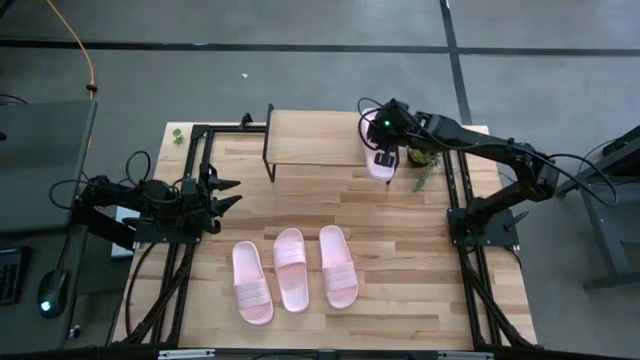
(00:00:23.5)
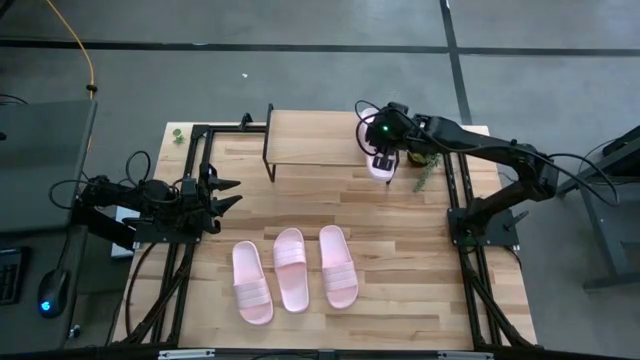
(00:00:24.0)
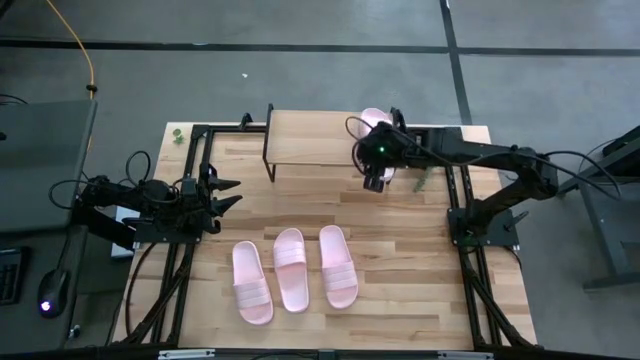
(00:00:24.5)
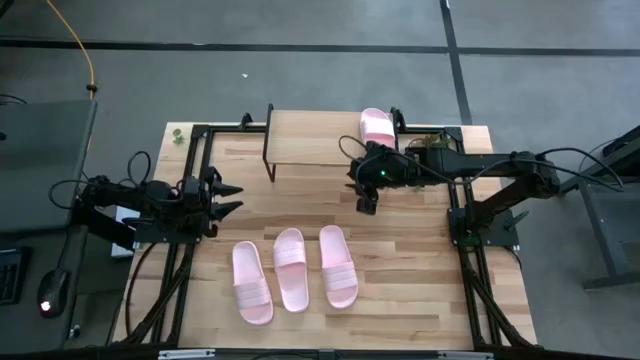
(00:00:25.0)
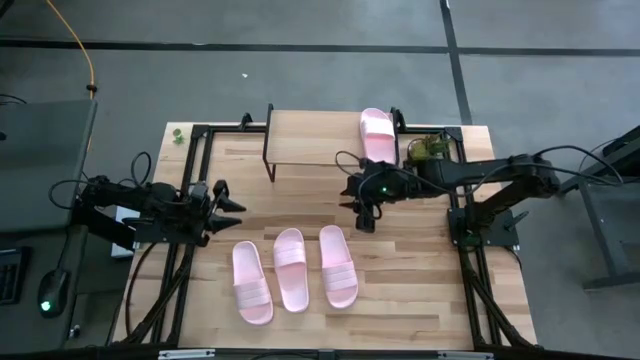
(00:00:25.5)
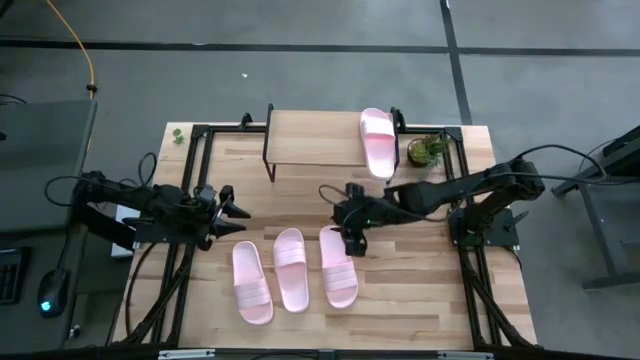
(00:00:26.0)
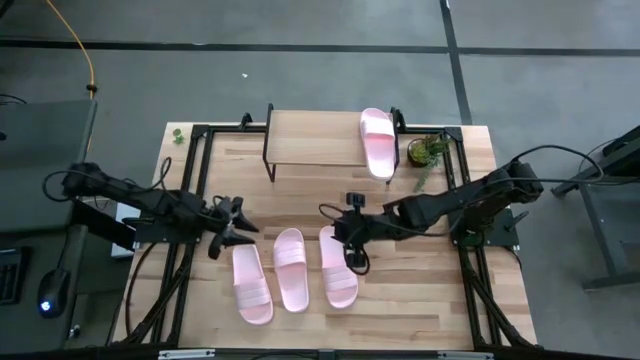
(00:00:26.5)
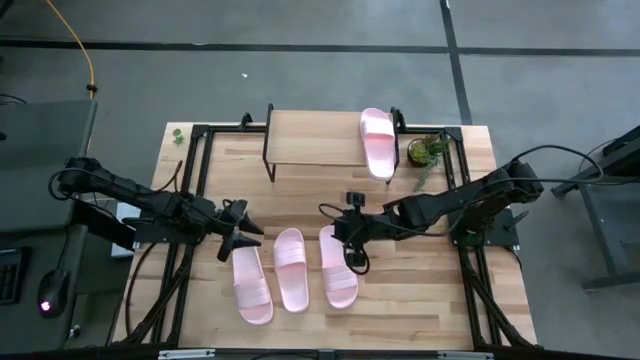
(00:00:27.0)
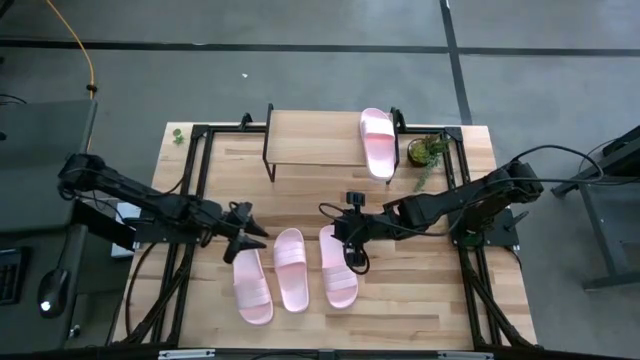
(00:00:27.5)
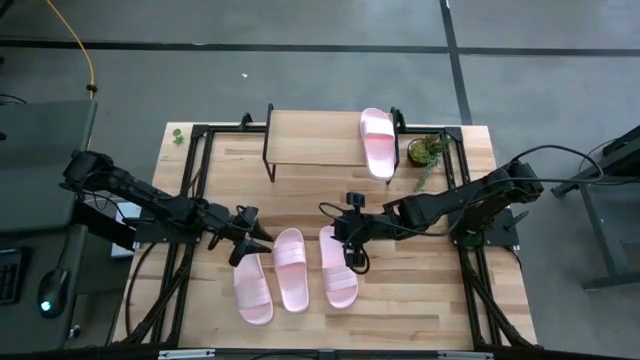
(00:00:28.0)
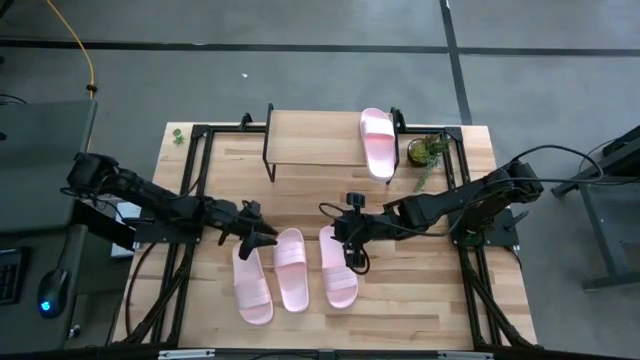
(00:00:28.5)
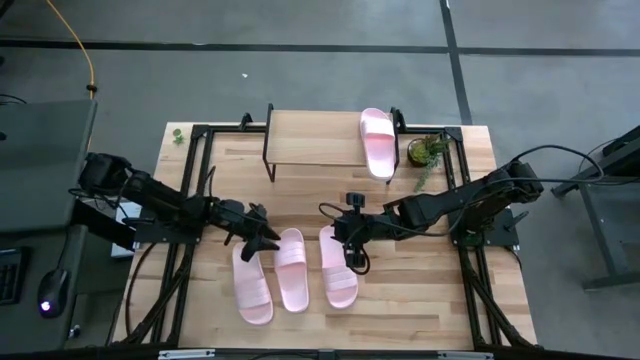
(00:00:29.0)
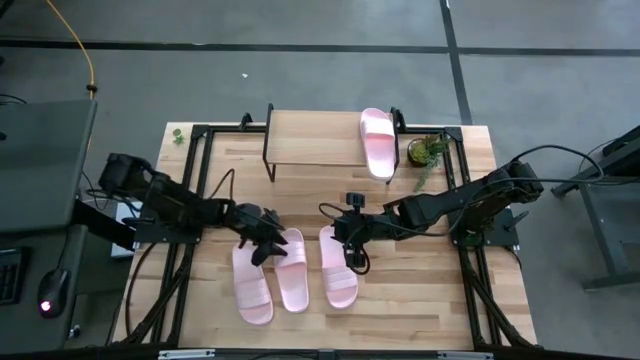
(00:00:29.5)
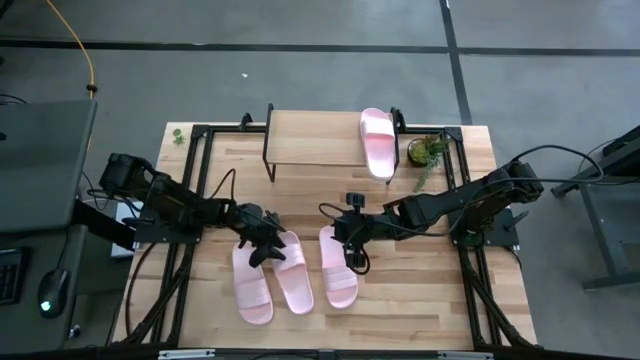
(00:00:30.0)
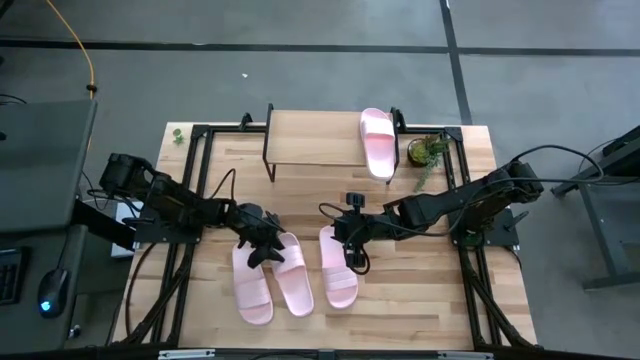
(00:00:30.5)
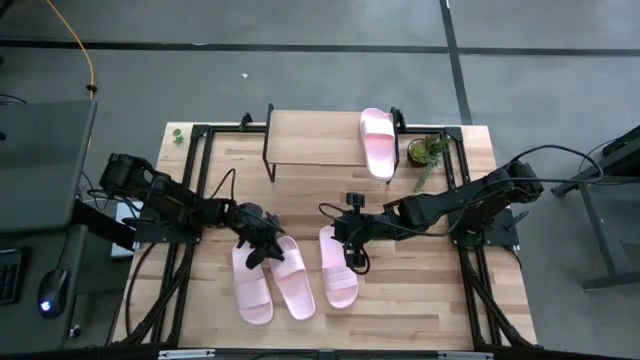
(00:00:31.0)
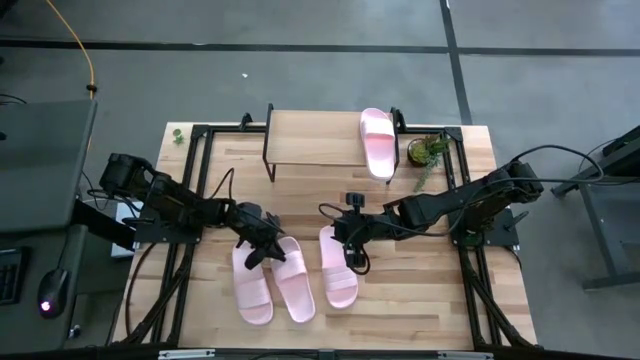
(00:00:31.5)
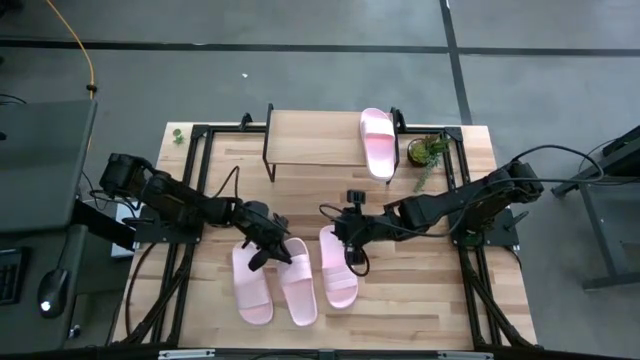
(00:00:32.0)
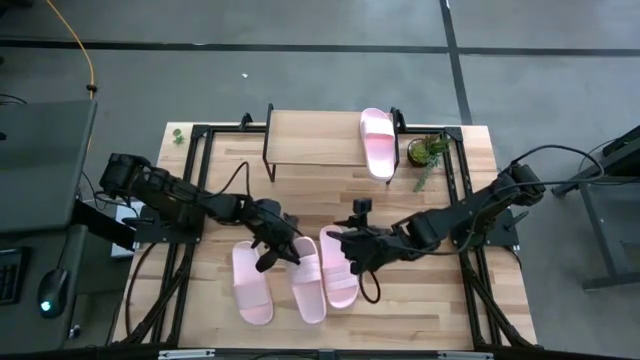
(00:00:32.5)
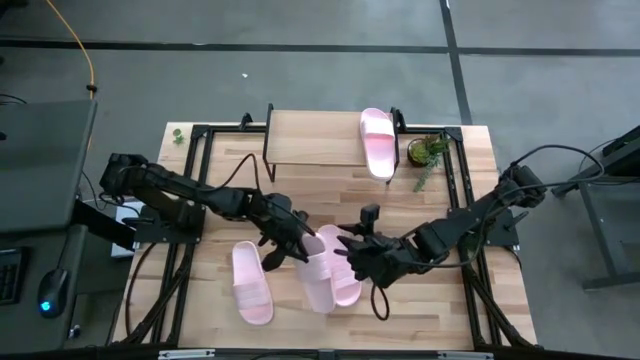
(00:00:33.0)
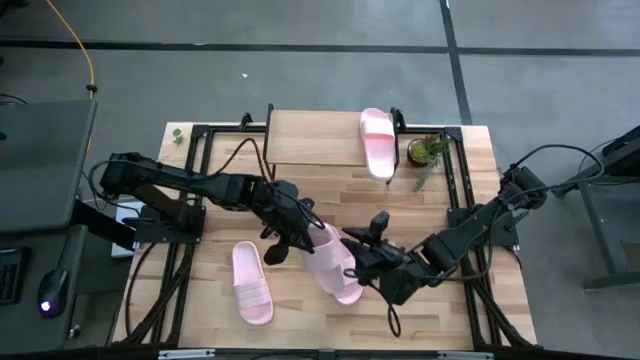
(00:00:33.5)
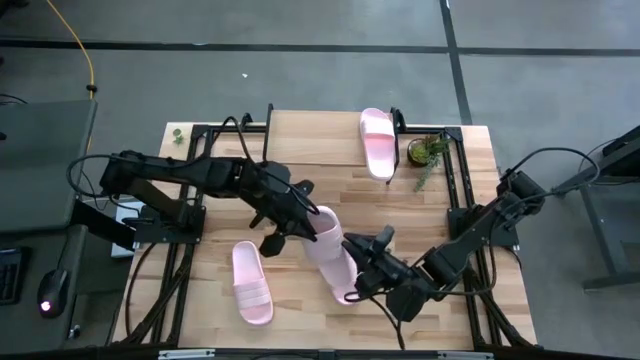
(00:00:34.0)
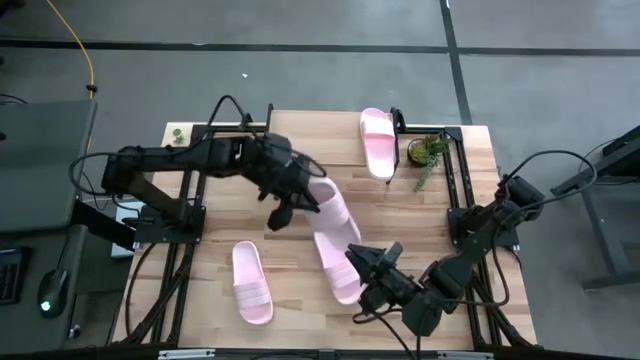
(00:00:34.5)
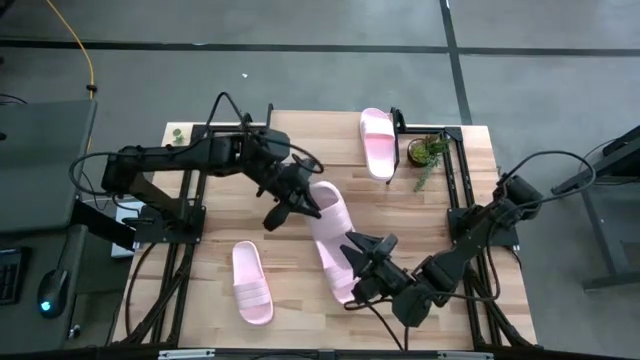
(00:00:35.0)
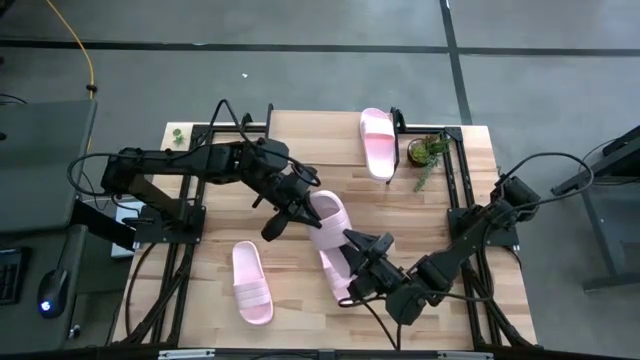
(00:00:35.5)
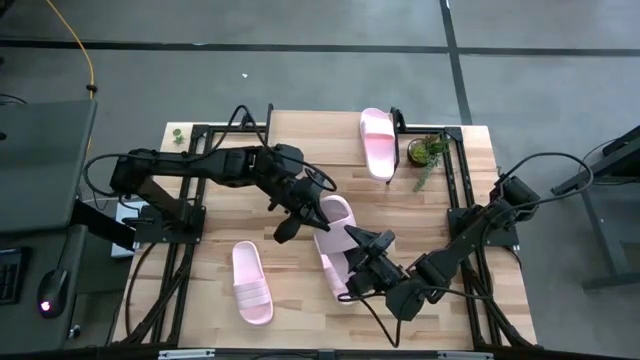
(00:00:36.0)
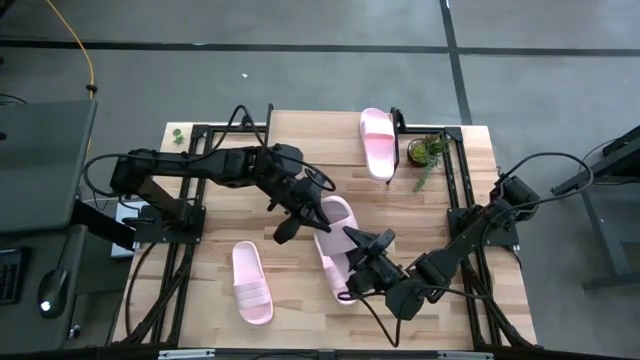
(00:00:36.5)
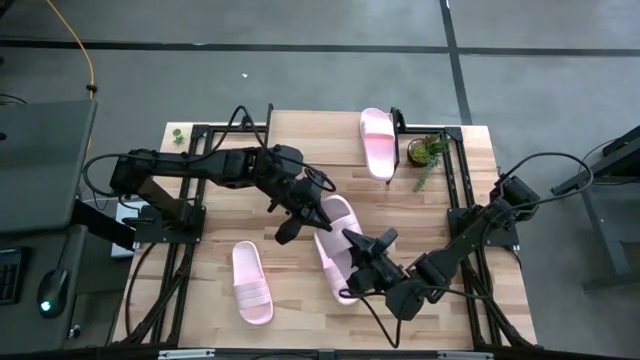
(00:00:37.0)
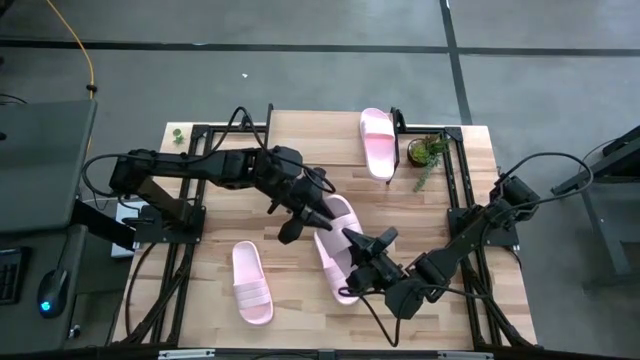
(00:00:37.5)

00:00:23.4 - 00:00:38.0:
Task: Pick and place slides into the shelf
Put the pink slide on the shelf
